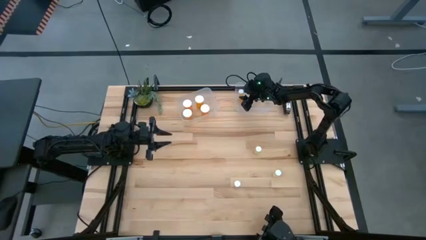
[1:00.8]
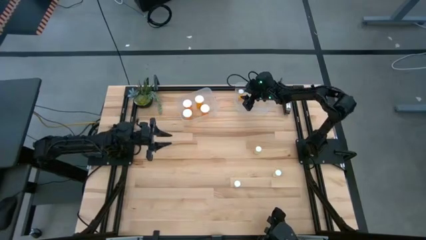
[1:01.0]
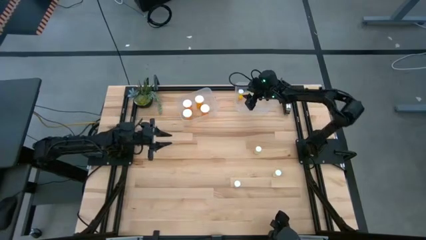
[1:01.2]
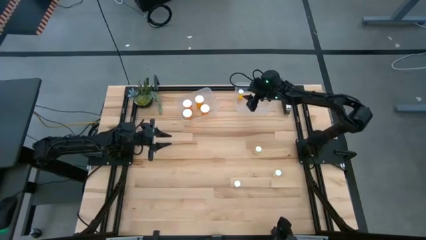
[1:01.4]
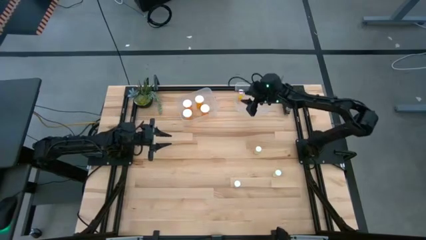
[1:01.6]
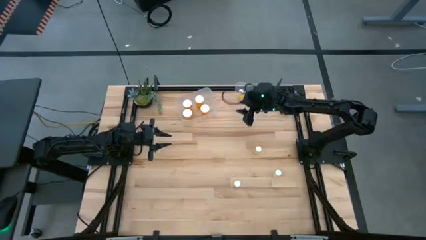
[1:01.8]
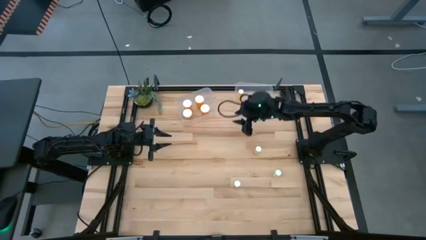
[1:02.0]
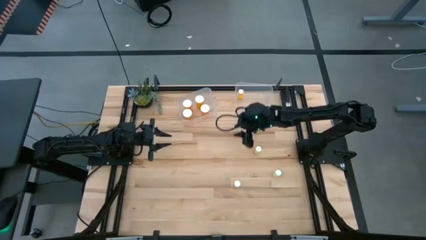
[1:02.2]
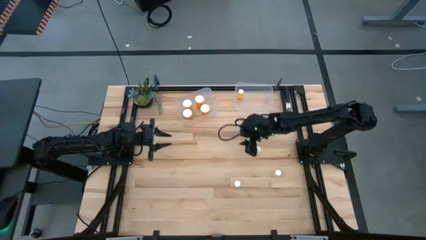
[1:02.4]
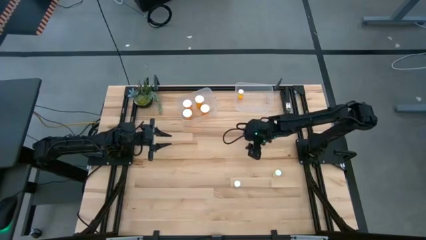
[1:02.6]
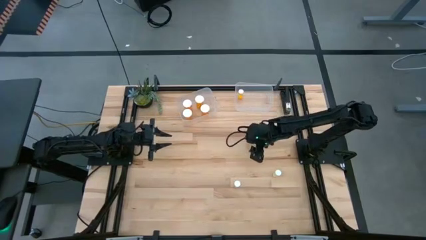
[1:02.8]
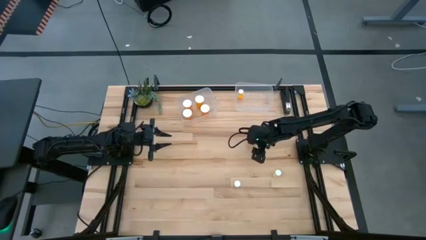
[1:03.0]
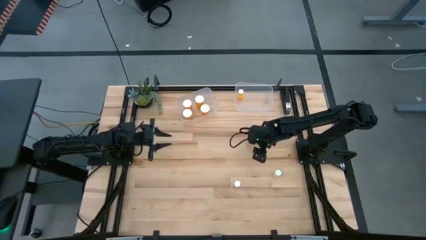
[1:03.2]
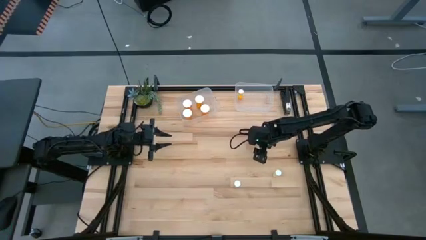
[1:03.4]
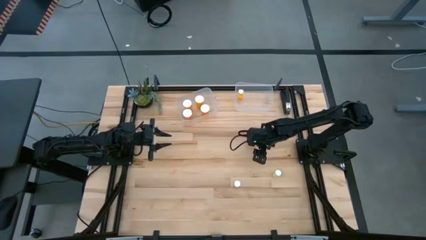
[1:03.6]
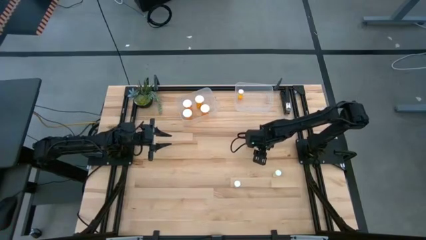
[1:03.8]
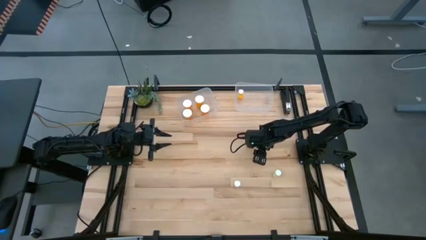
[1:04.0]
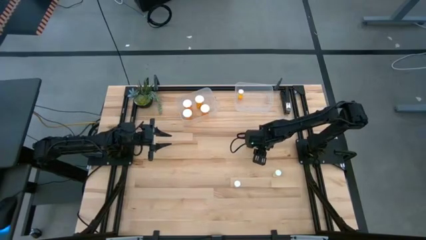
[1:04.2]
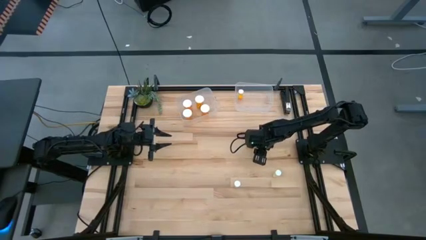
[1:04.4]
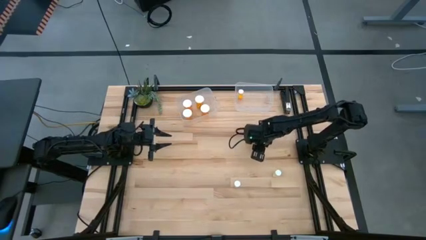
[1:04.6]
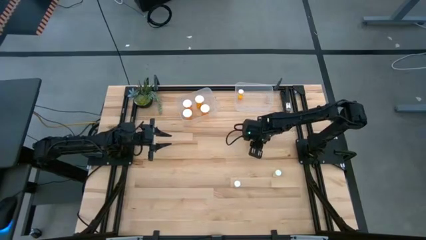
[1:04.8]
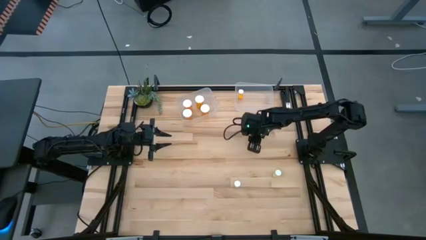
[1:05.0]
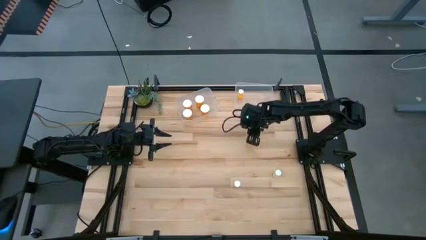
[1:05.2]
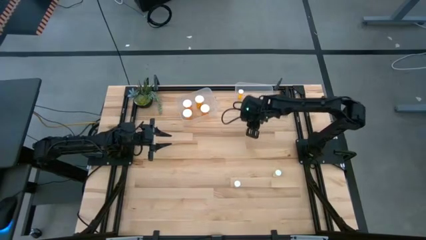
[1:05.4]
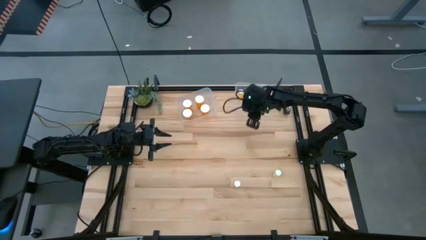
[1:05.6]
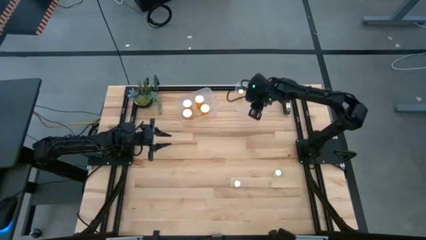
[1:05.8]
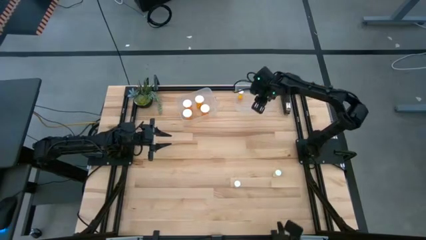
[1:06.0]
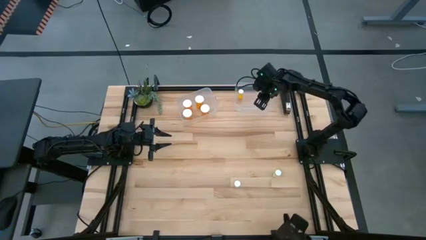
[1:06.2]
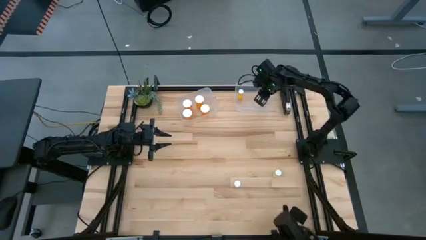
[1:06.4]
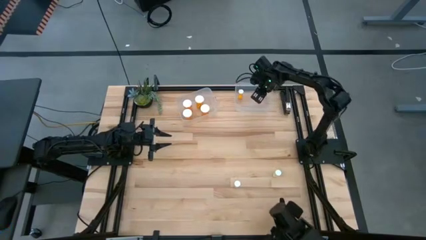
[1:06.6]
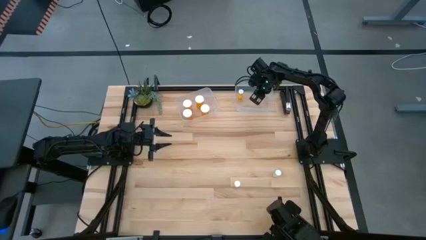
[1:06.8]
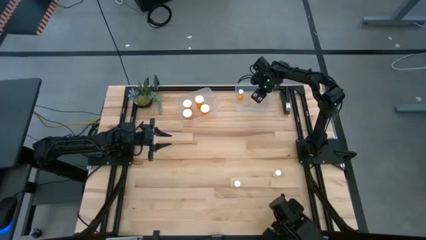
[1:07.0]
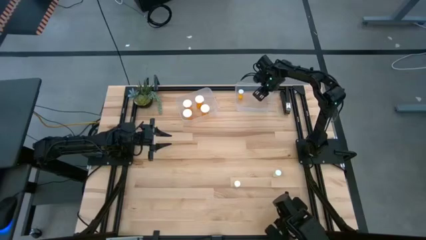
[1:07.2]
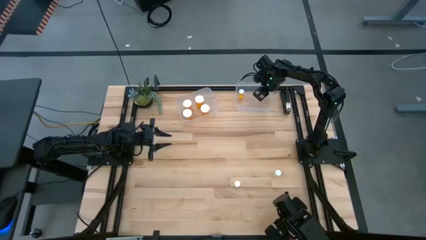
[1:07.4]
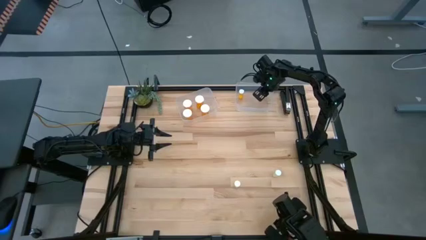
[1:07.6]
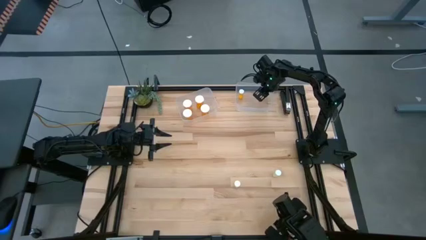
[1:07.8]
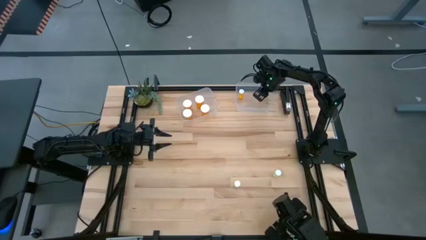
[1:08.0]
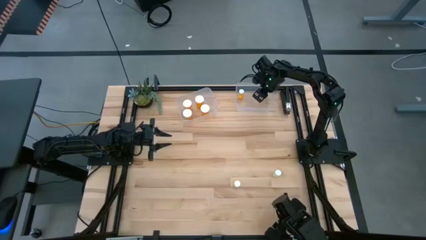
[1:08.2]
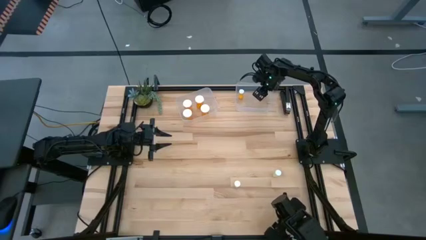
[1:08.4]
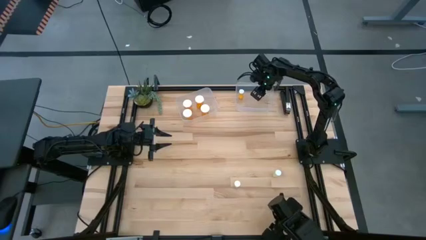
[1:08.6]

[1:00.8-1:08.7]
Task: Pick and place medicine bottles into bin by pill shape (circle, oval)
Put the yellow tablet bottle into the right transparent bin

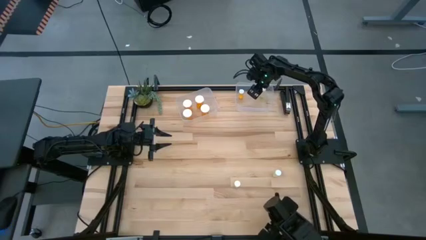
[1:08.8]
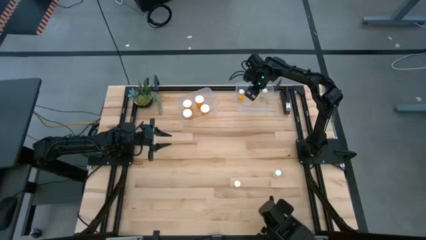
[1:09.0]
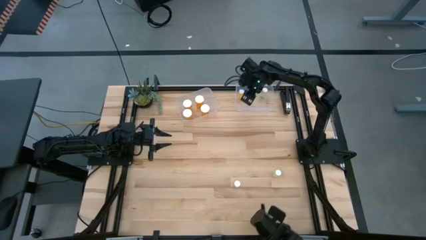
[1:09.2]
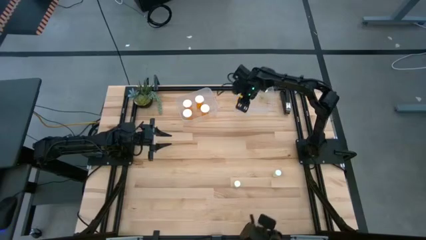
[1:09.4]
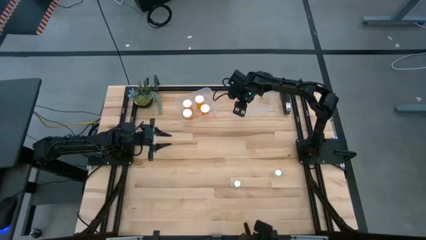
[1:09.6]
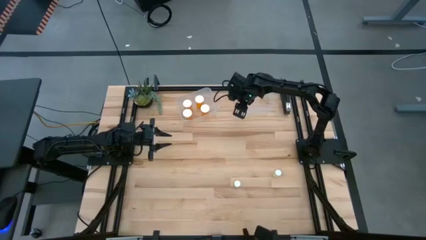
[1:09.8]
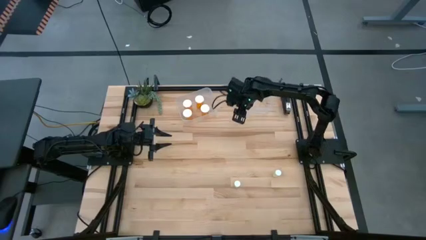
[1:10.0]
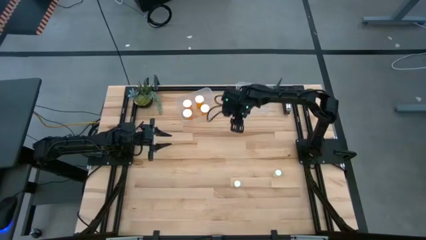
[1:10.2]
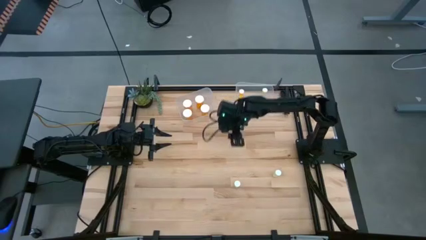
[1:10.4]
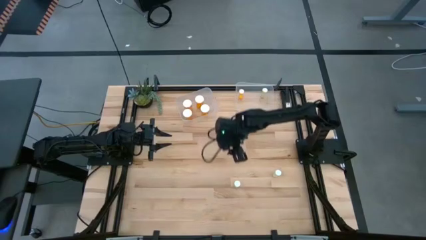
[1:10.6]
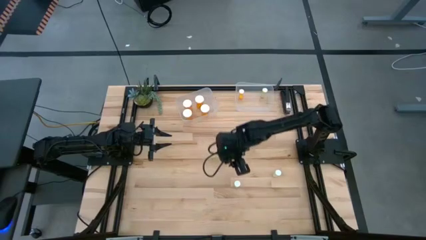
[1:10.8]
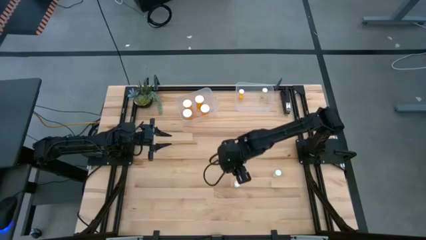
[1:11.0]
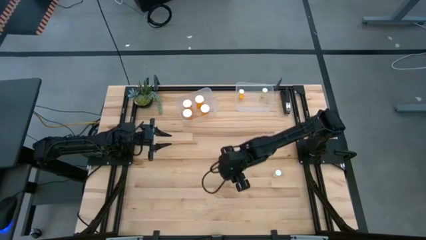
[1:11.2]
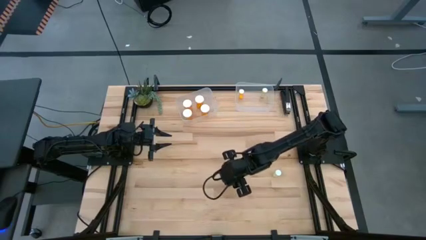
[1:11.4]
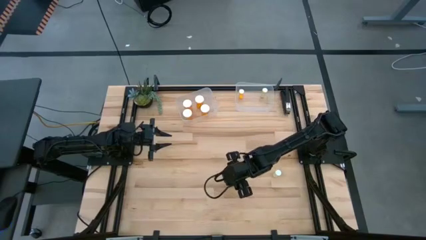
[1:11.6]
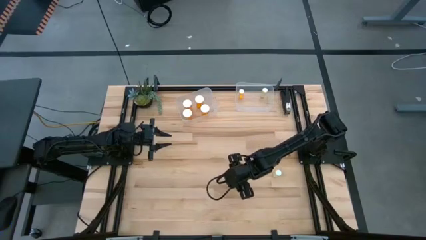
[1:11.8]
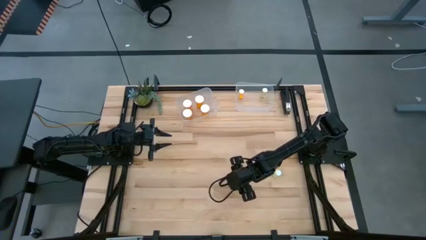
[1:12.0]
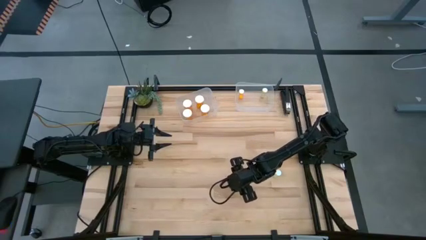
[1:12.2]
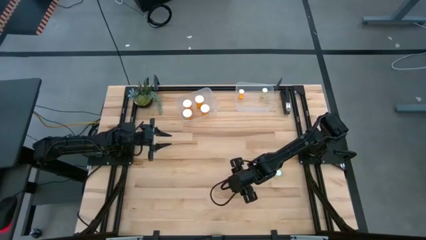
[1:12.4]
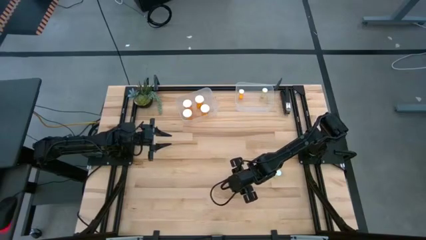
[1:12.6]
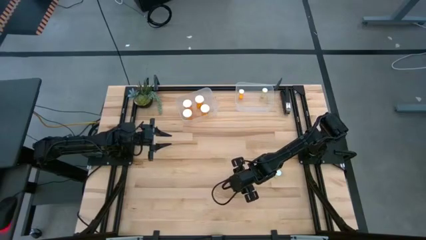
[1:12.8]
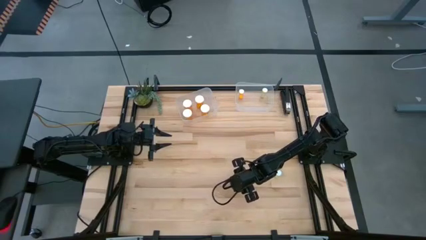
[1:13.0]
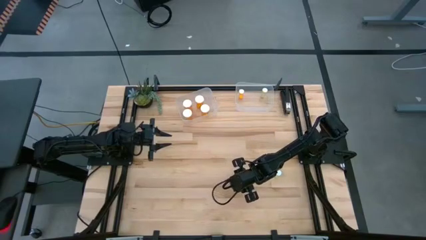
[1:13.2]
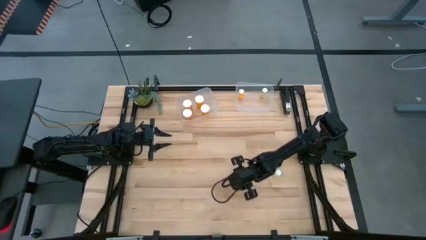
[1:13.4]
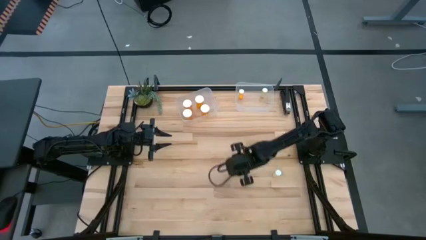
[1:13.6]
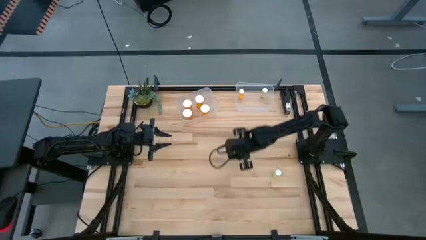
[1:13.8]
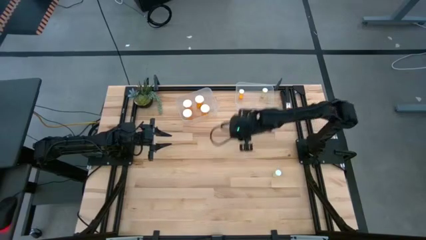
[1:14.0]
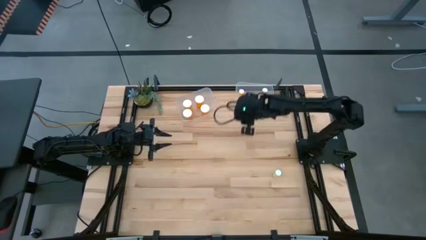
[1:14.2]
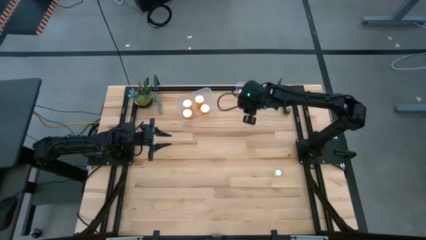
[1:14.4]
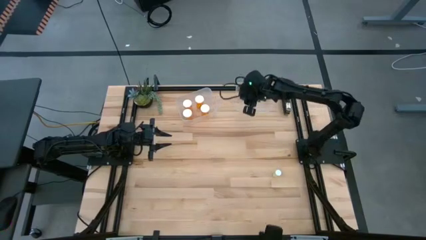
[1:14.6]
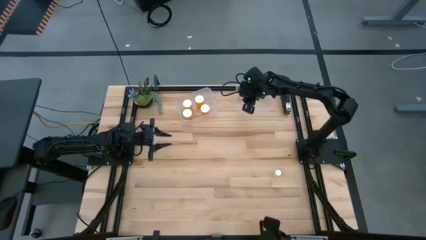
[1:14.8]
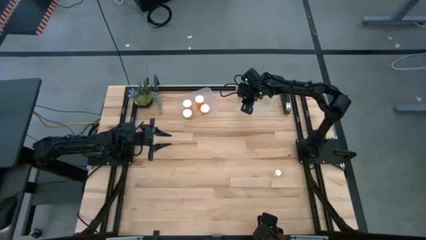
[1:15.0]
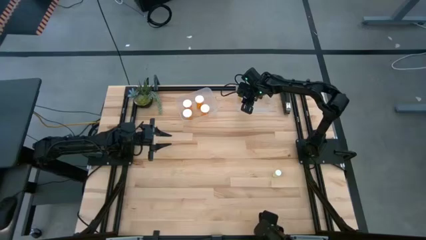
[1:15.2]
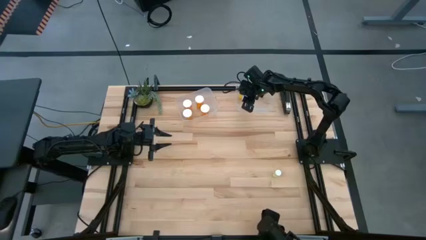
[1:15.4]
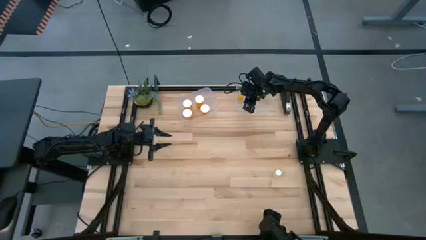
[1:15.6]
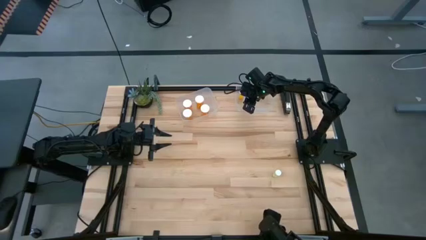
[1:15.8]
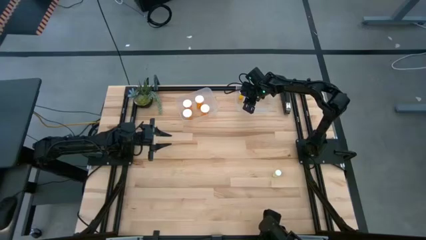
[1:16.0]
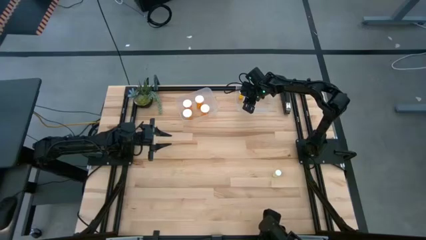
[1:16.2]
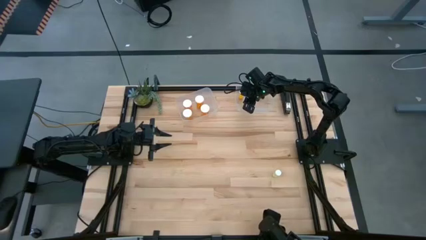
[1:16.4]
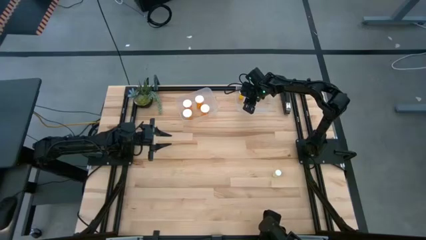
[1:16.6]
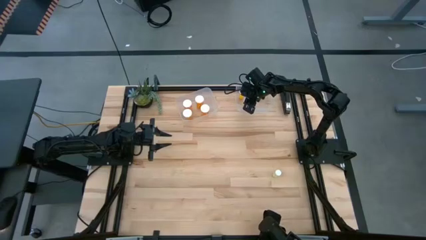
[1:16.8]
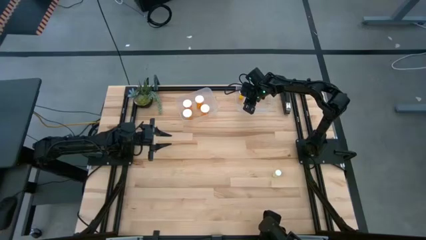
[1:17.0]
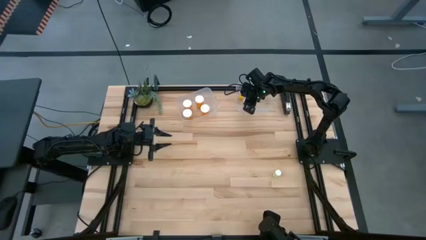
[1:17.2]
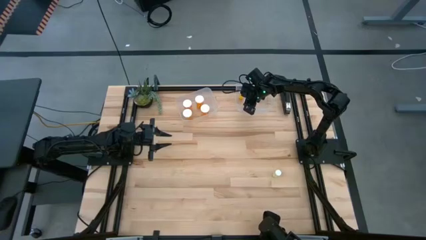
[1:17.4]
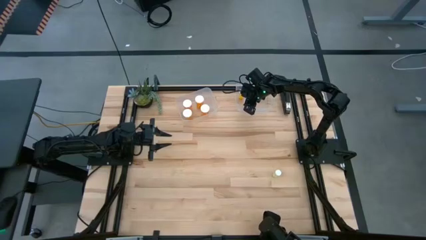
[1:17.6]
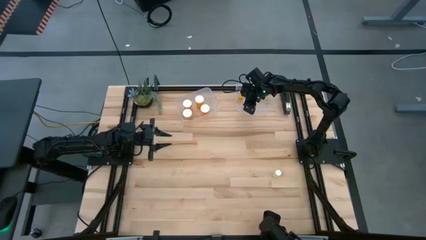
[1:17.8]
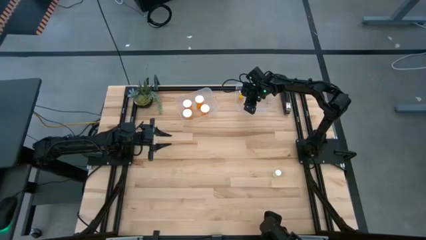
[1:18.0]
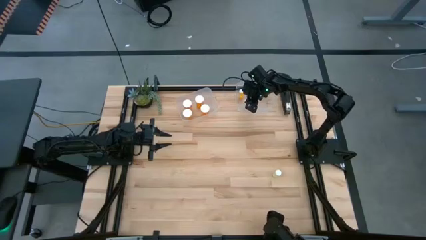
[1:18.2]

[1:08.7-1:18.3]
Put the yellow tablet bottle into the right transparent bin
